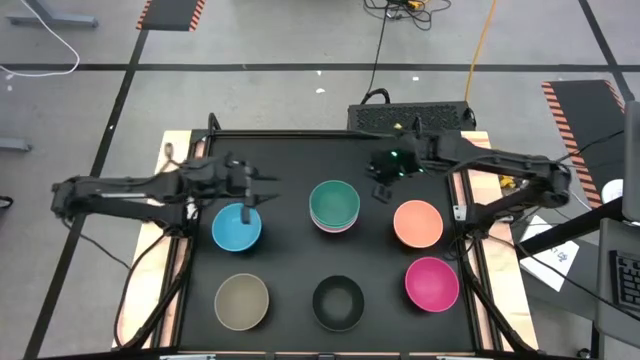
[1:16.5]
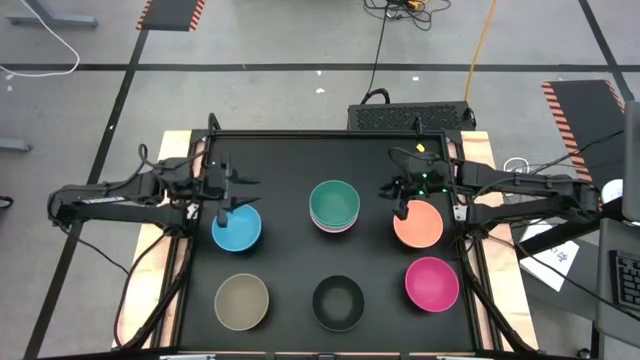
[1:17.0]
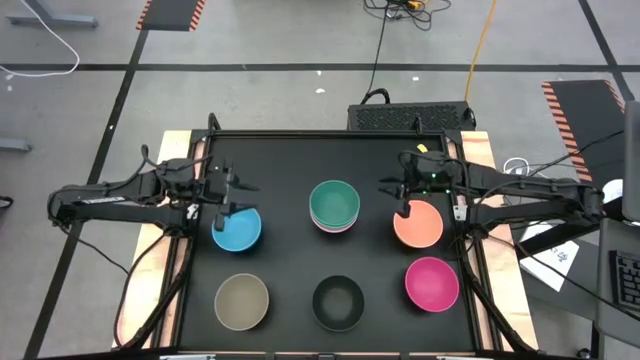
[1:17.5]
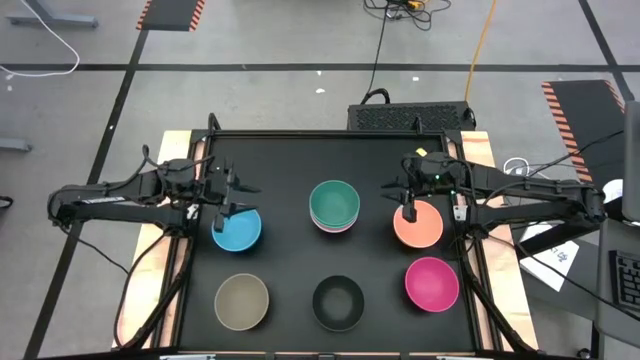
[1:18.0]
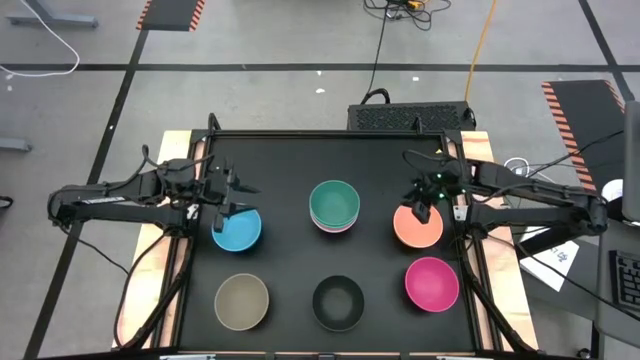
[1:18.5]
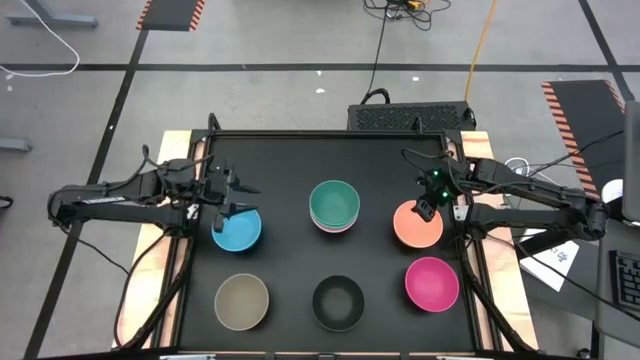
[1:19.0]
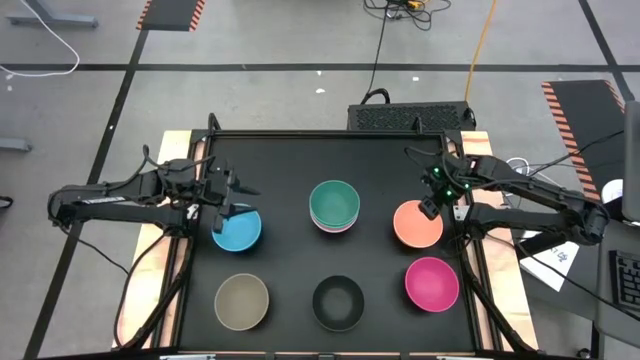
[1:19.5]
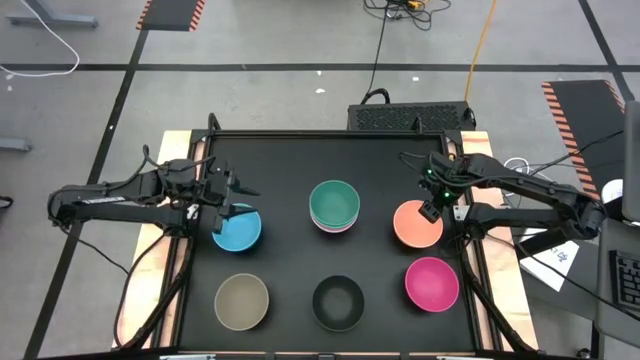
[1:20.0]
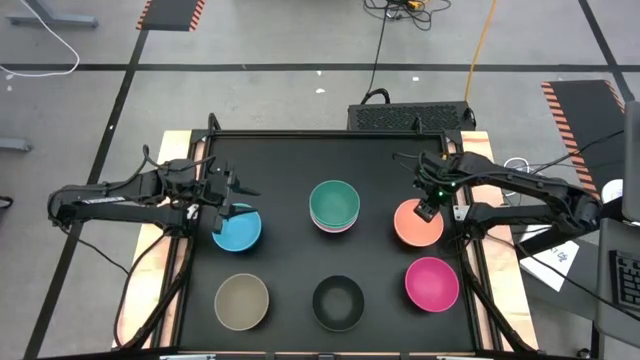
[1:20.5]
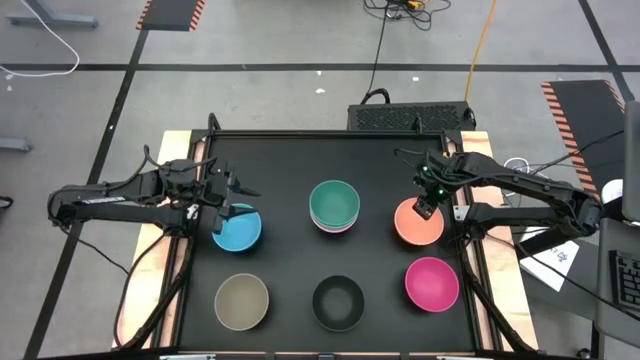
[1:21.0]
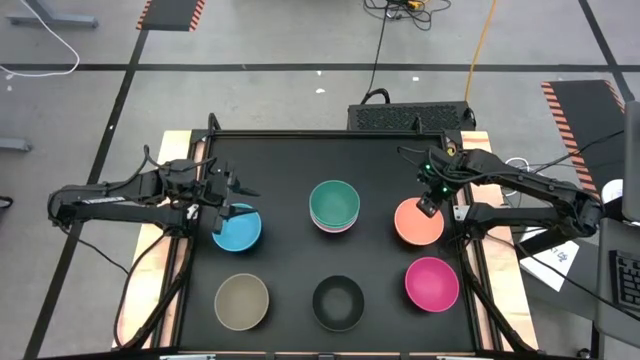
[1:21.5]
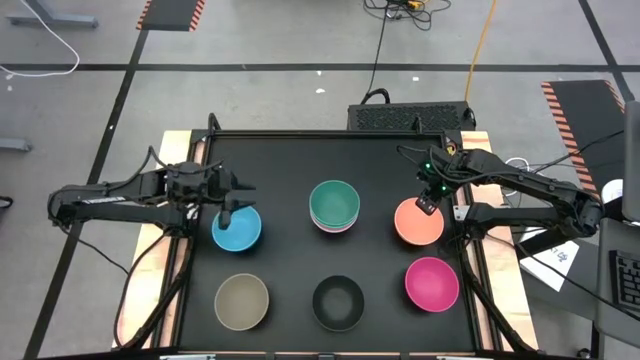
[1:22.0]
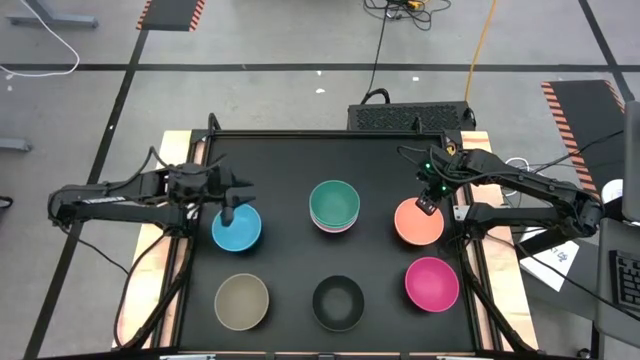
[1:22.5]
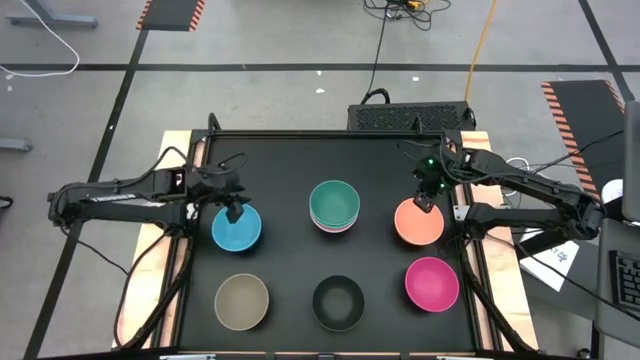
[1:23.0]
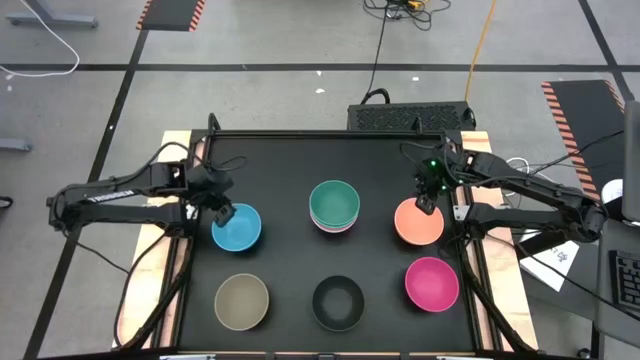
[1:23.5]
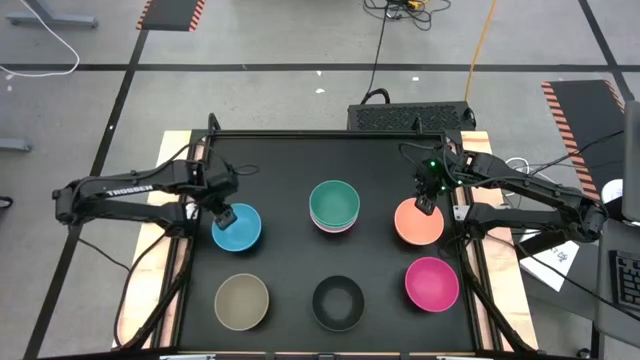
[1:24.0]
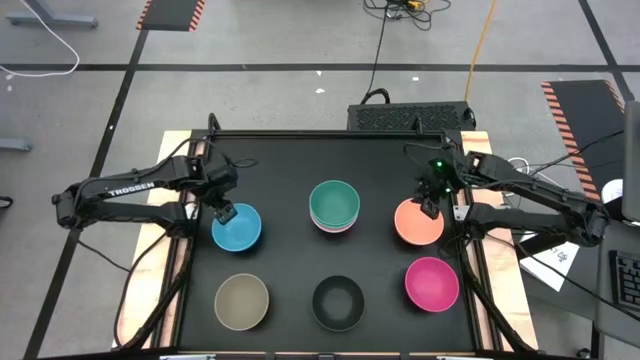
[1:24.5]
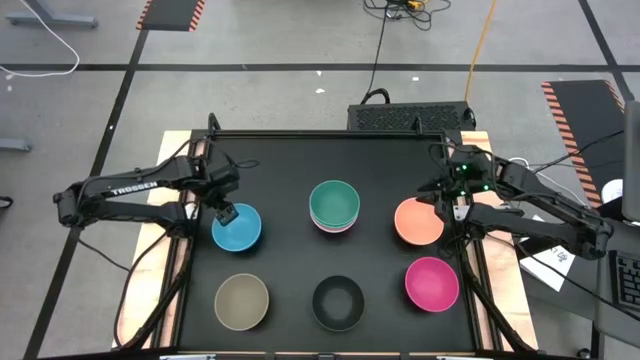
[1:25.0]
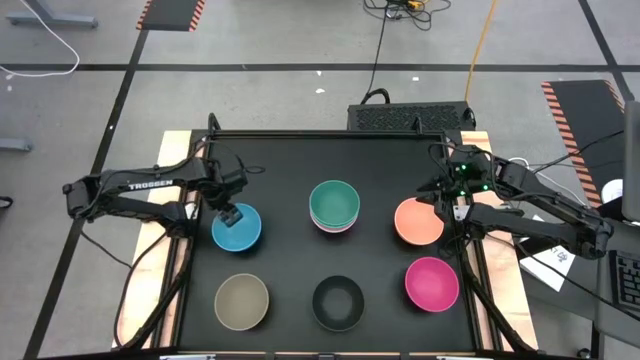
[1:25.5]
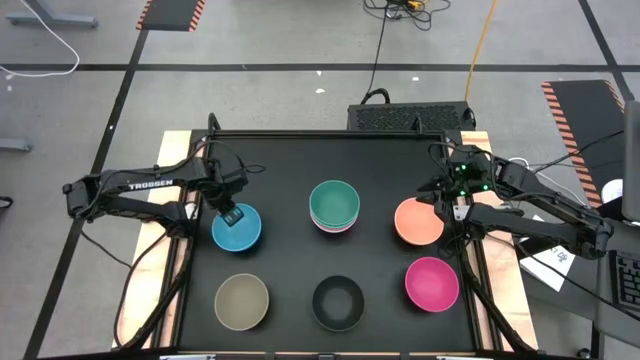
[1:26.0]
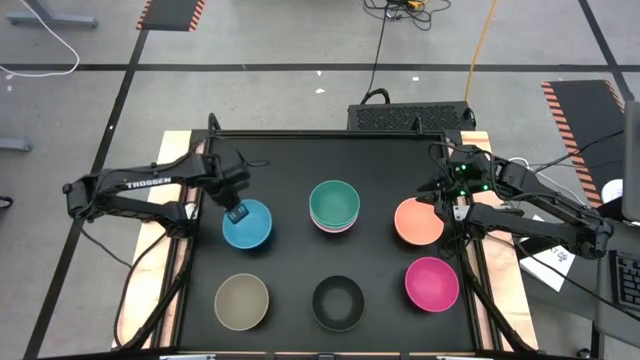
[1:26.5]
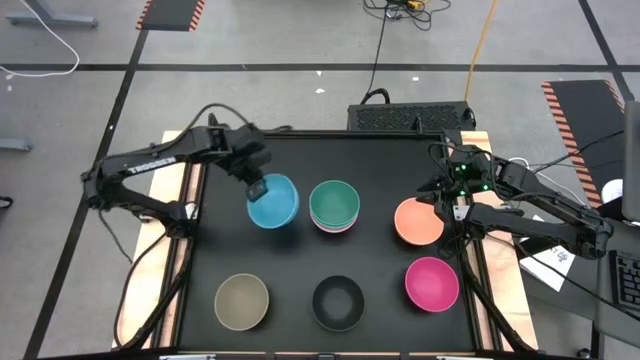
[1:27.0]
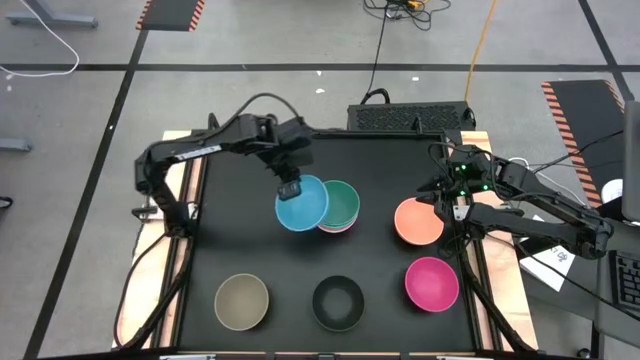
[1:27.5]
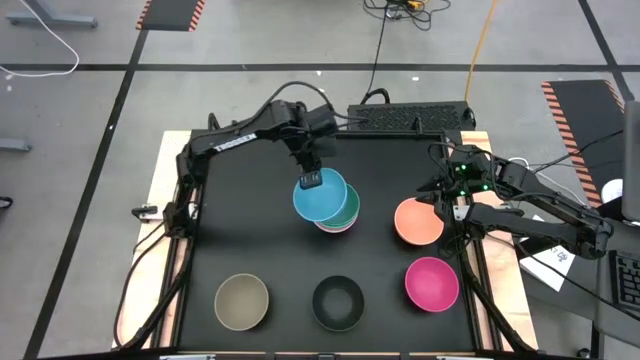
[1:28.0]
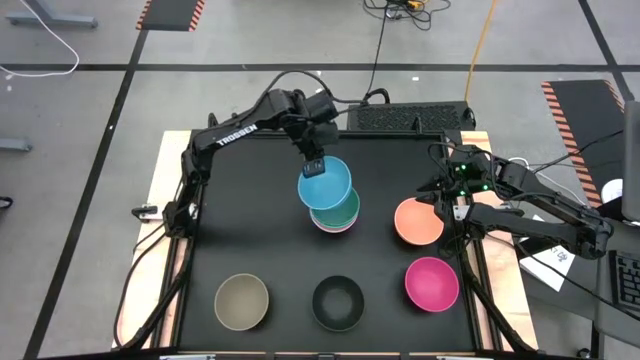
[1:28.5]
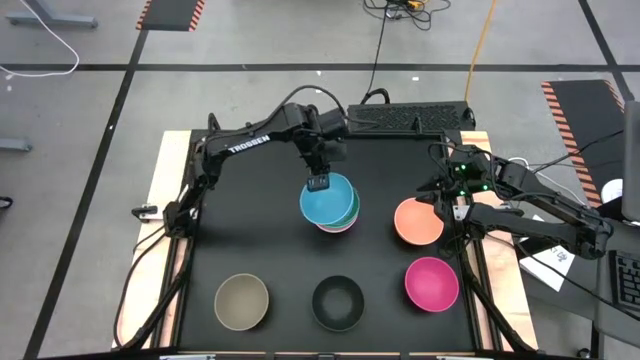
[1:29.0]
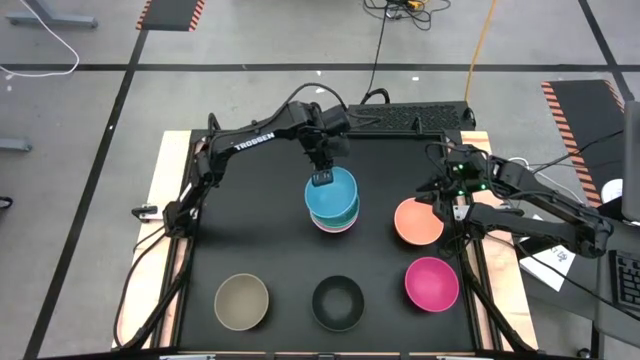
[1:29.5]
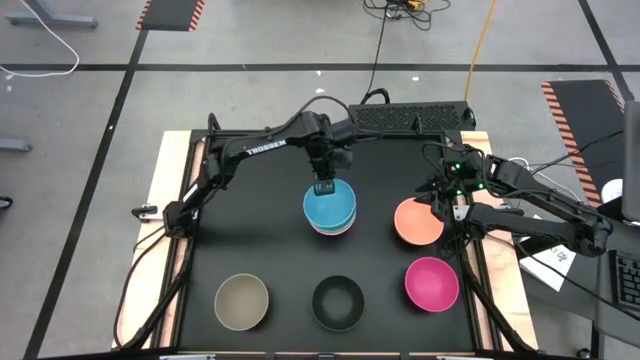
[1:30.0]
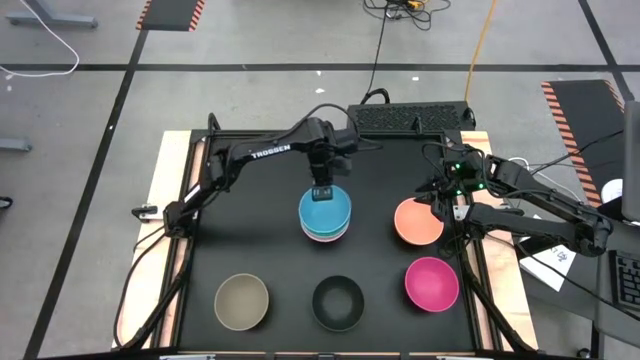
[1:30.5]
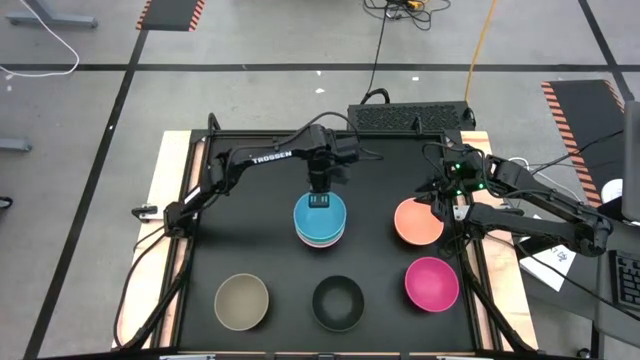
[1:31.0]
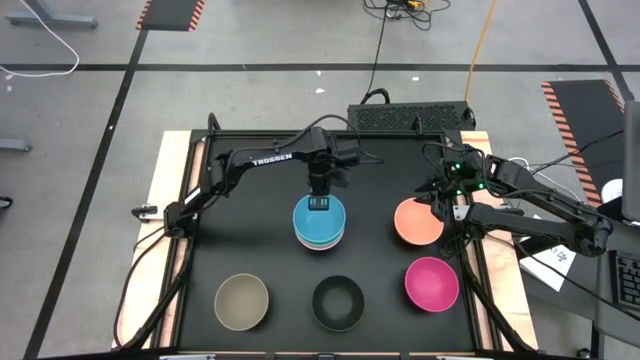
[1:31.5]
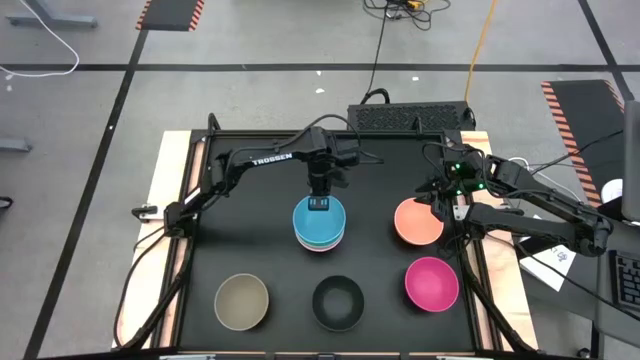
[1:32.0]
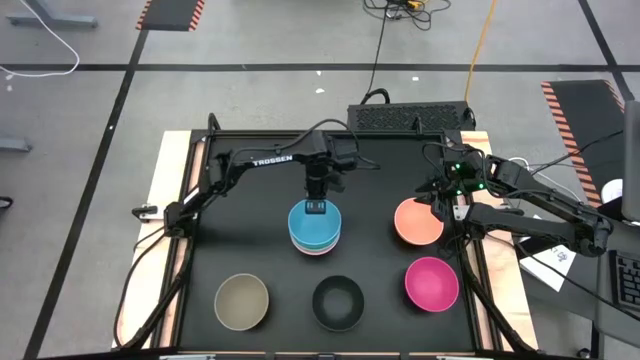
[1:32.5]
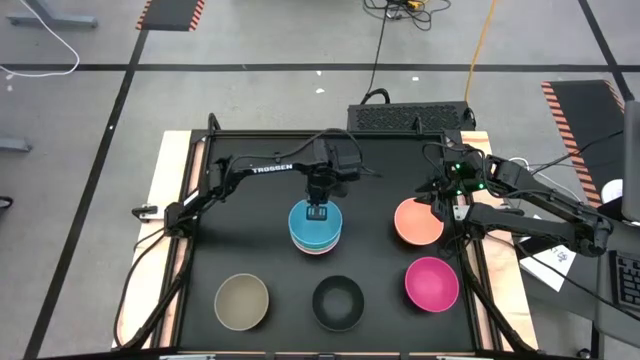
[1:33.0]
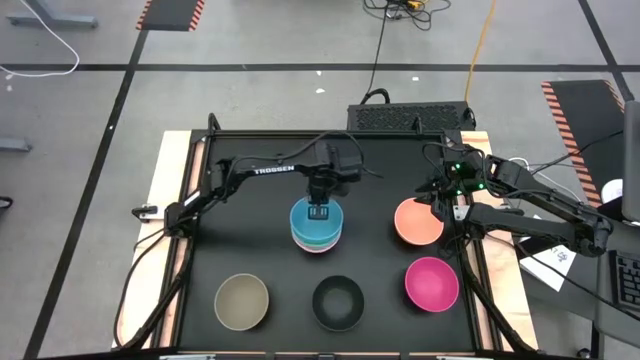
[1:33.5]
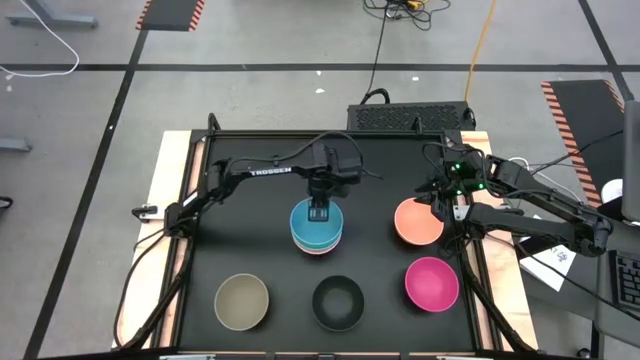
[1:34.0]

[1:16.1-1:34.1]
Task: Nest bowls inside each other
Stack the blue bowl on top of the green bowl

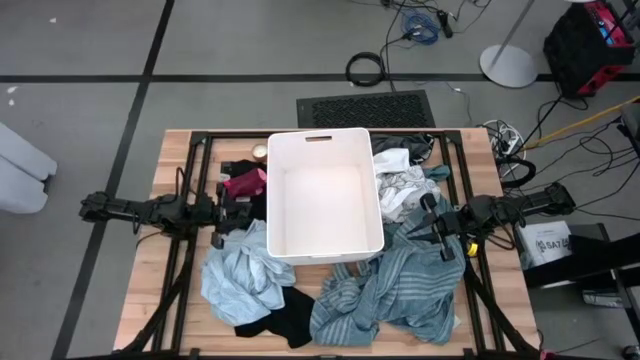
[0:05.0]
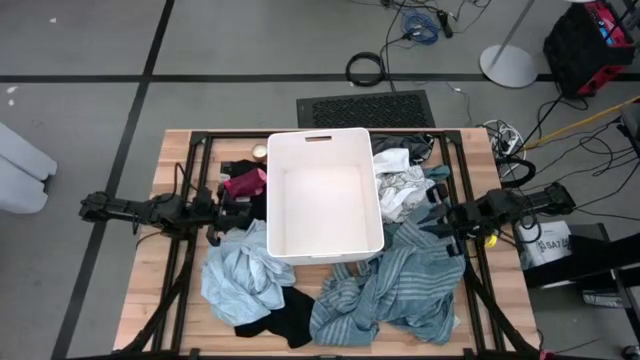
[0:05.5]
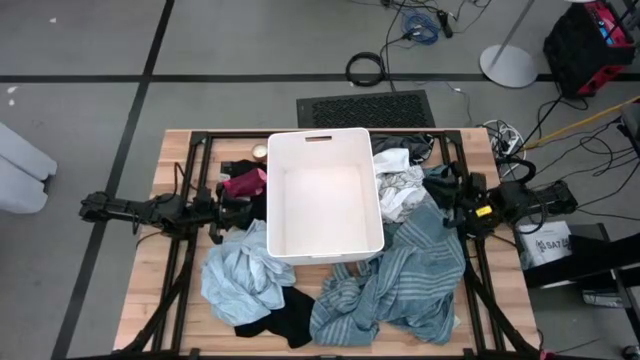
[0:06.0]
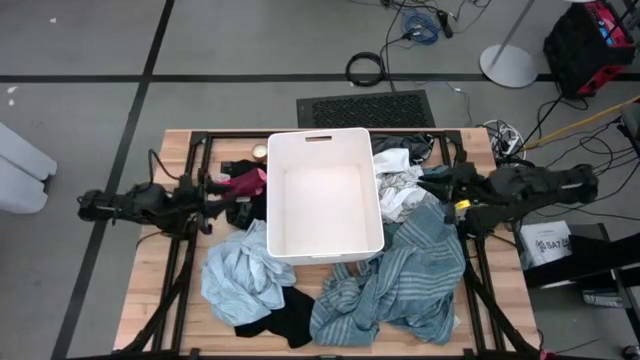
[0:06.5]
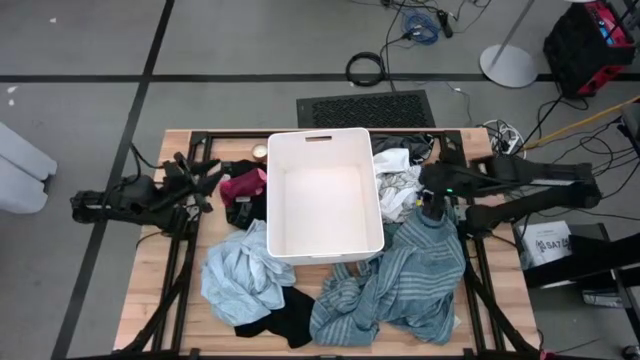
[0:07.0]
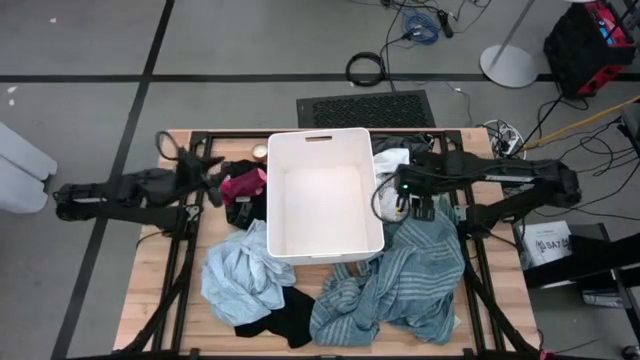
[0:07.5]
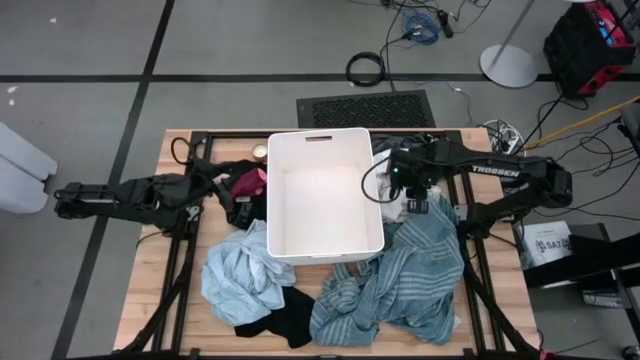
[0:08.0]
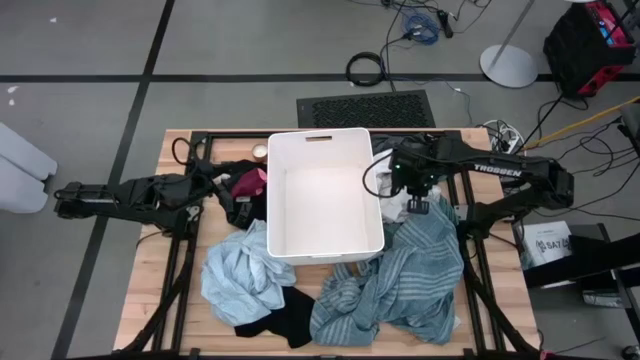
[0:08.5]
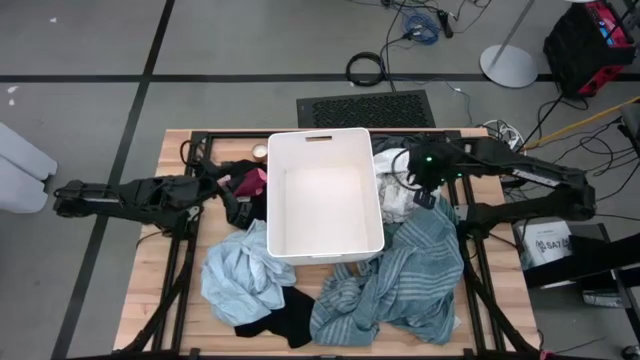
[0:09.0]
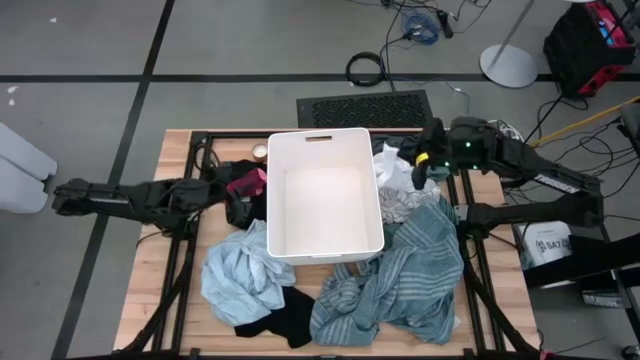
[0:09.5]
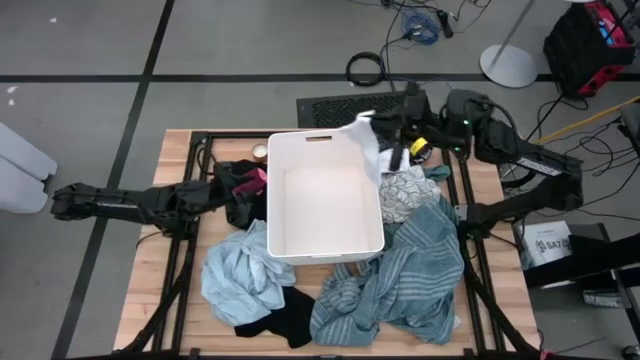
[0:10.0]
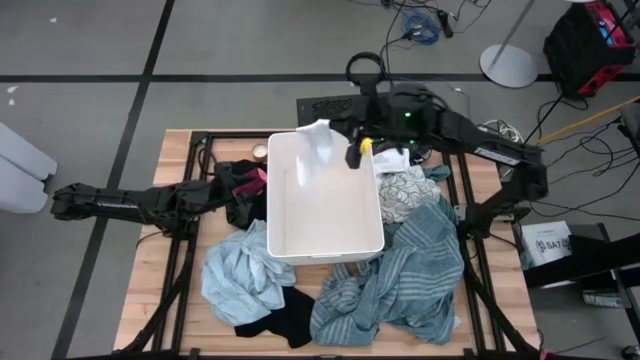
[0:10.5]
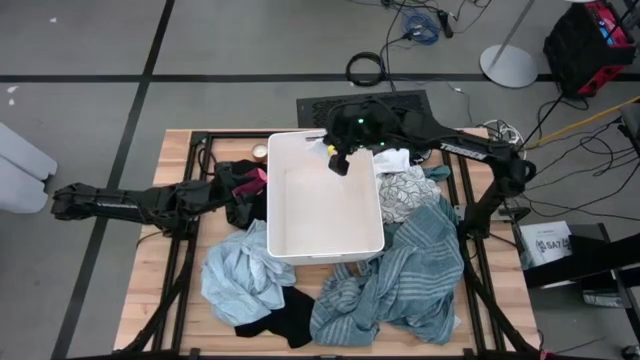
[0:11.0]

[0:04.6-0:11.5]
Task: Sort clothes
Put the white sock into the laundry bin
